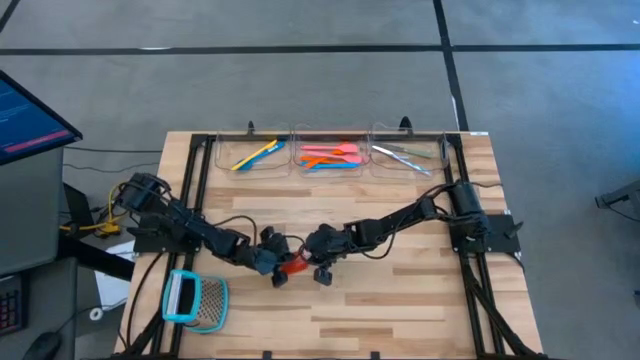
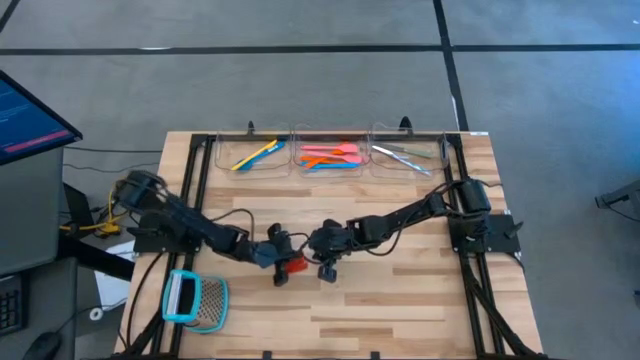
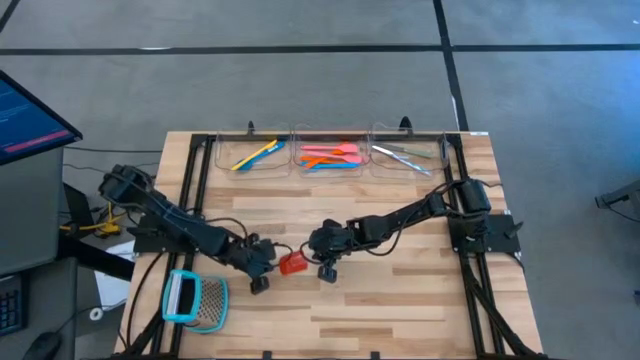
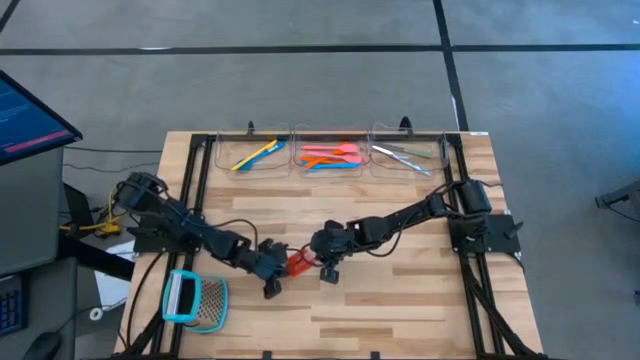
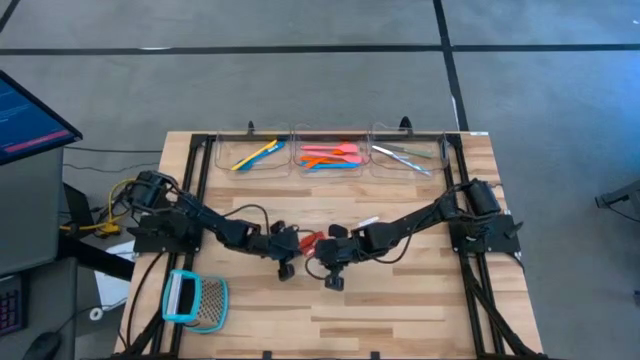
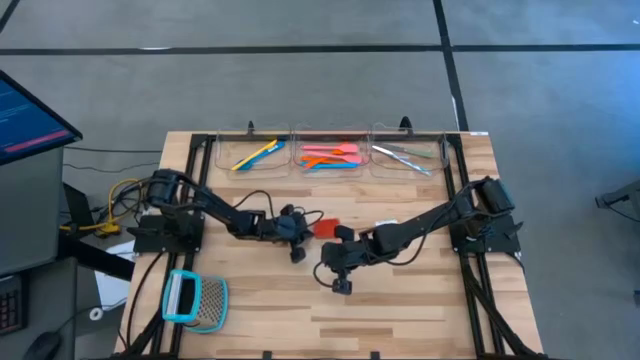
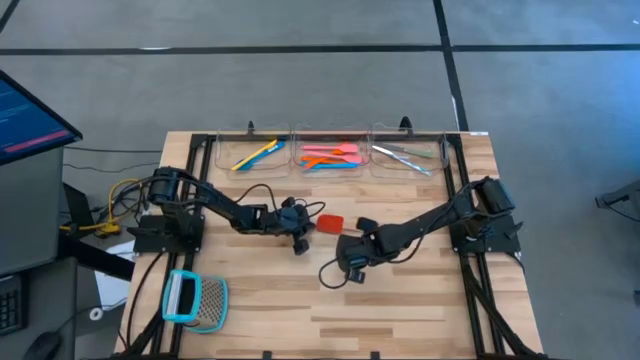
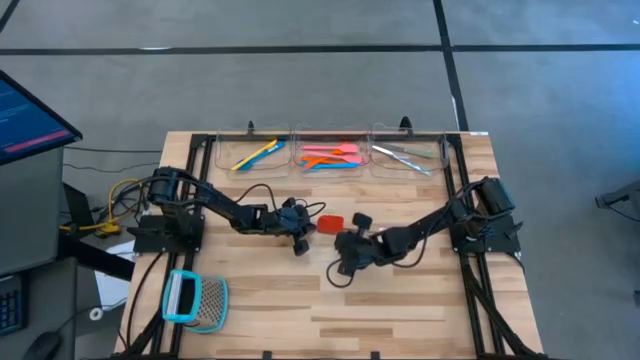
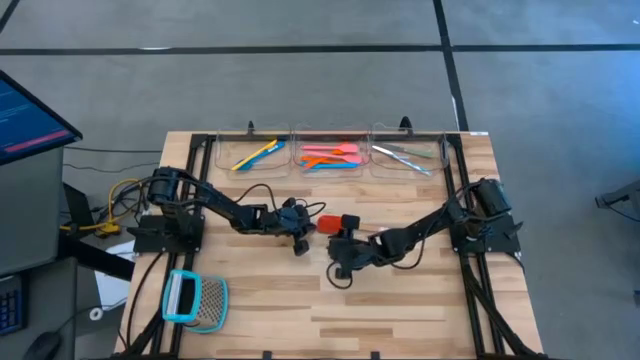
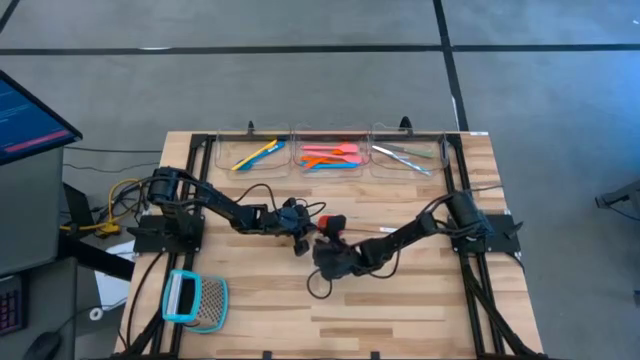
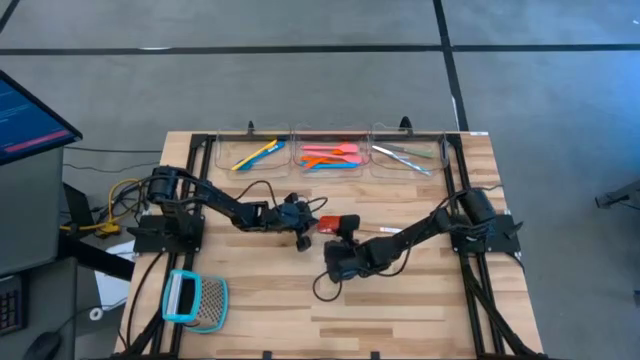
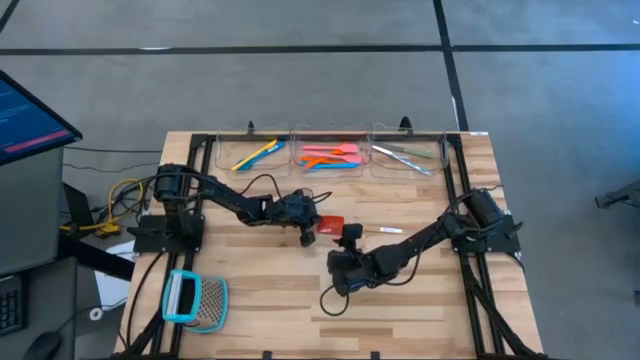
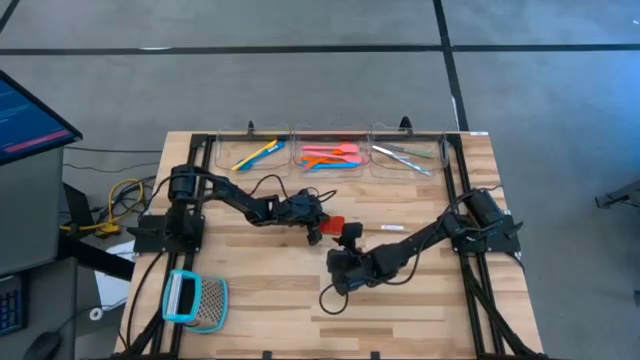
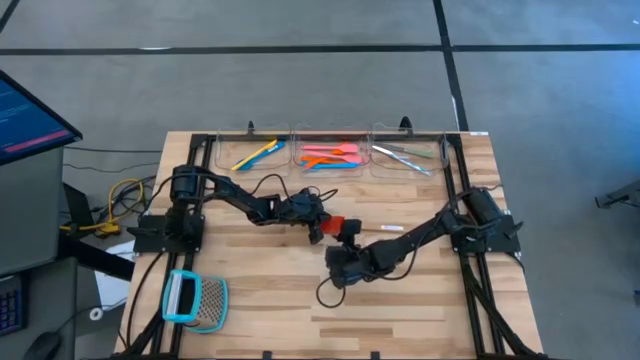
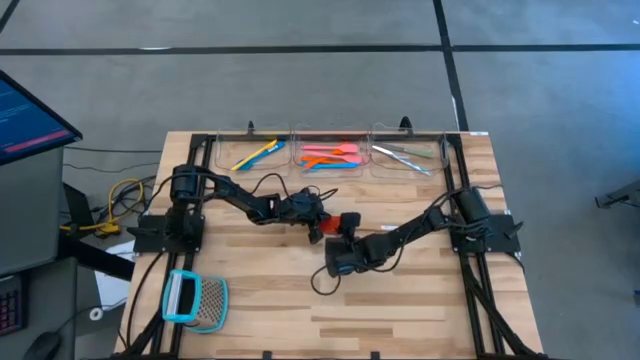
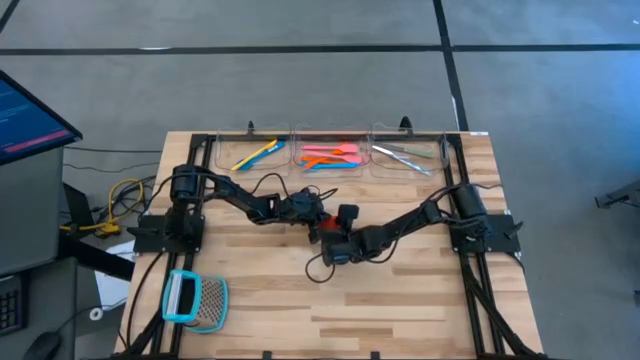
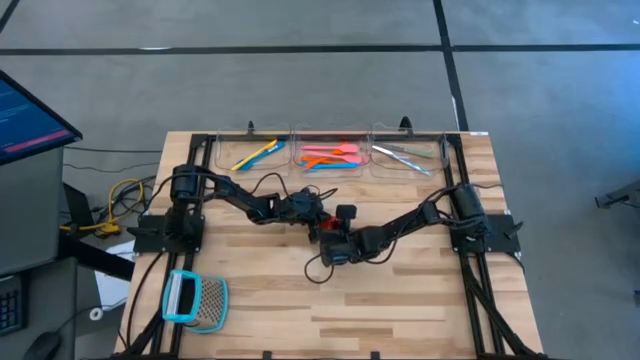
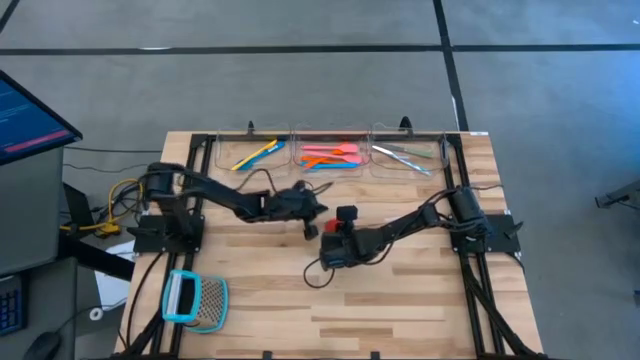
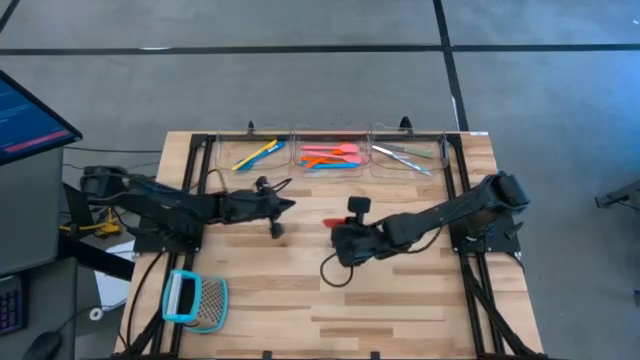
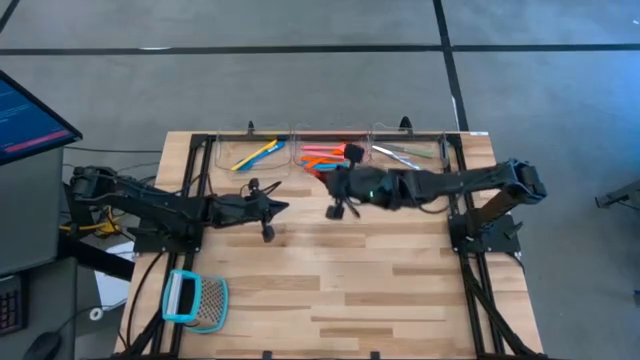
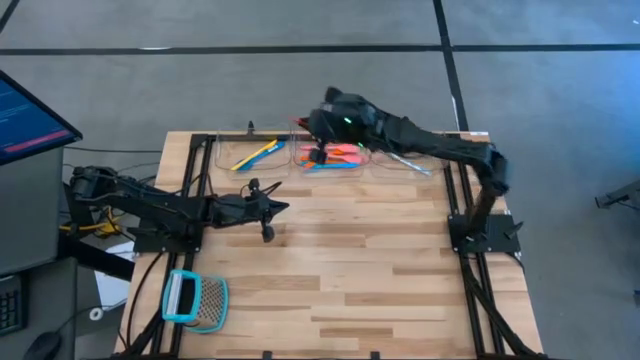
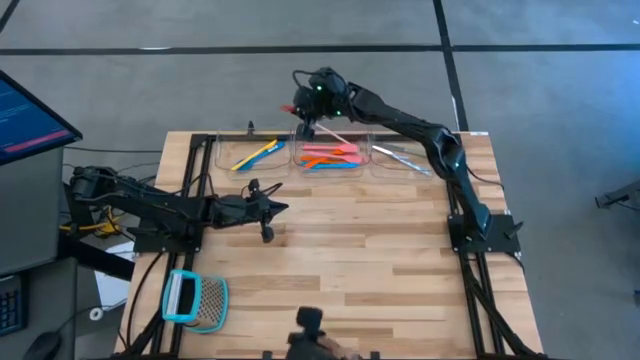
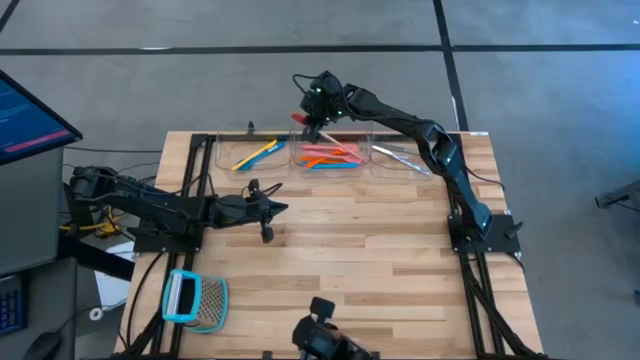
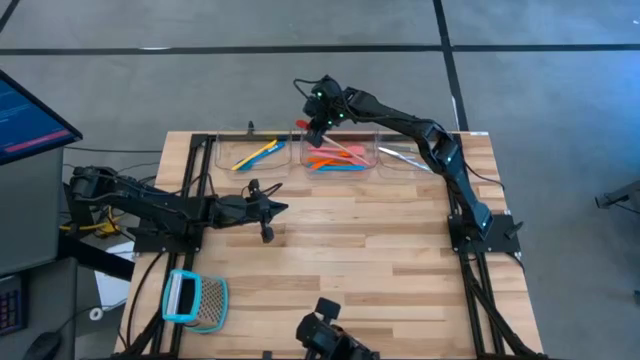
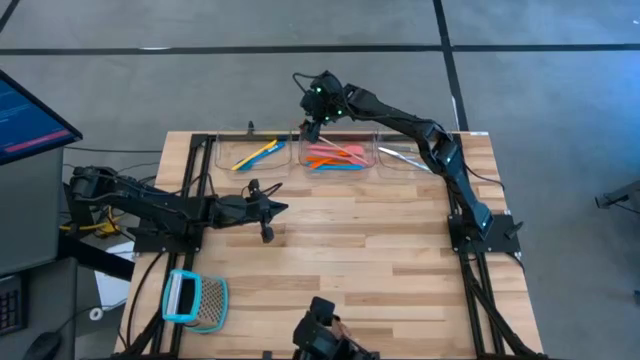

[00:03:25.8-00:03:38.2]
Task: Pick & Place Kitchen Items
Put the red spatula into the middle transparent bin

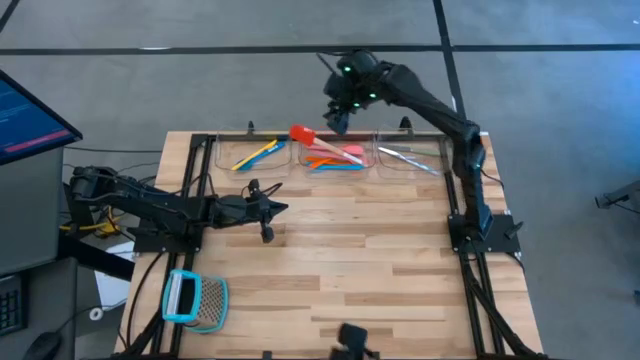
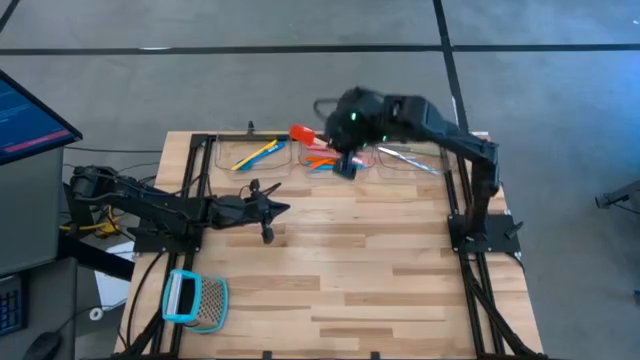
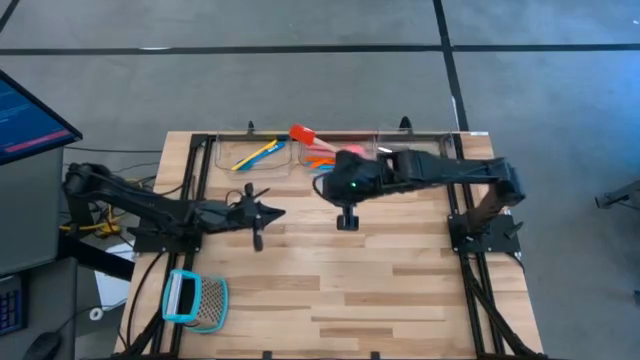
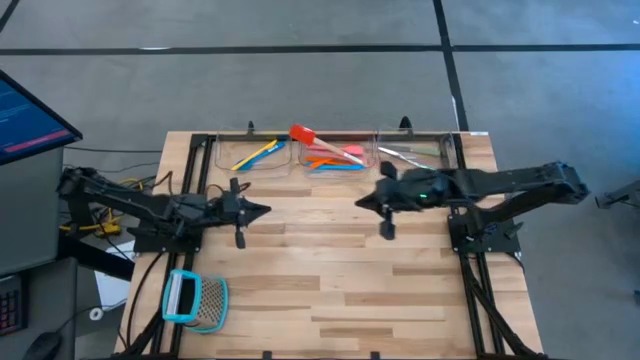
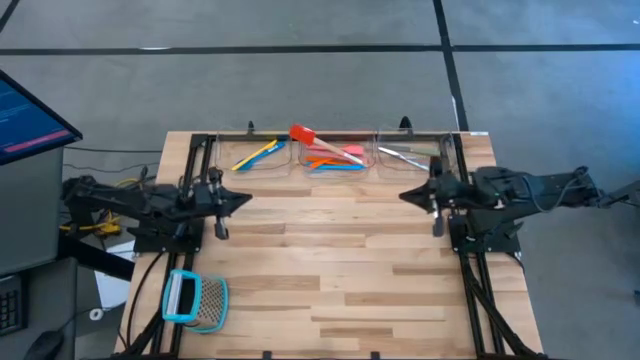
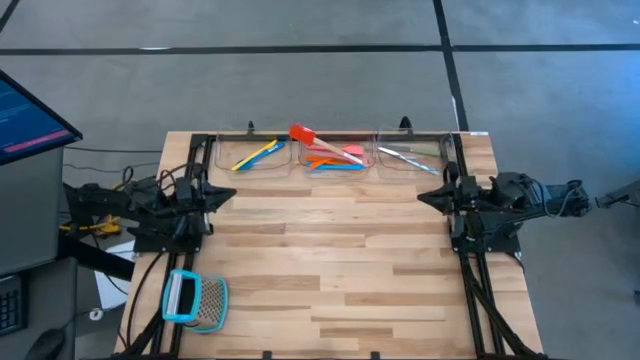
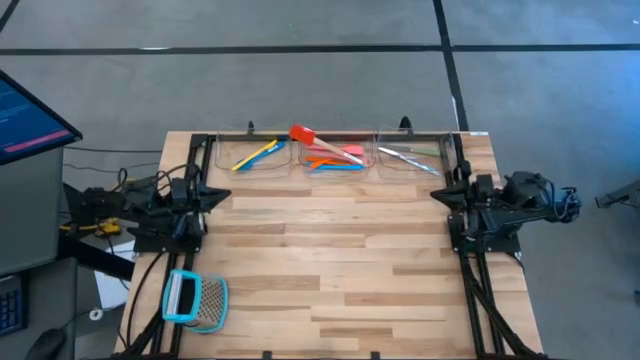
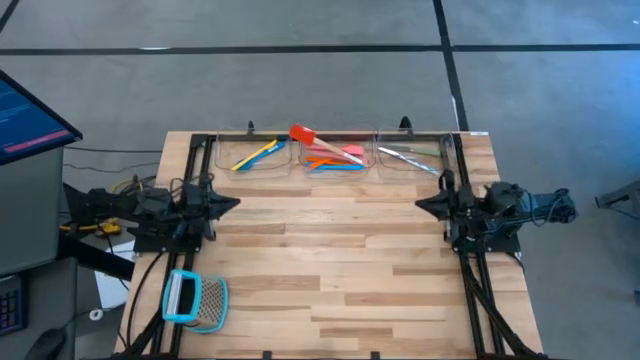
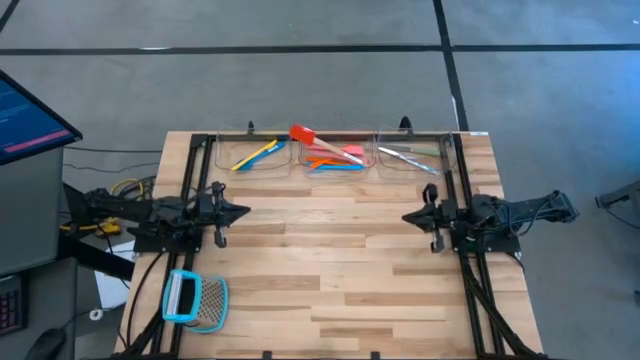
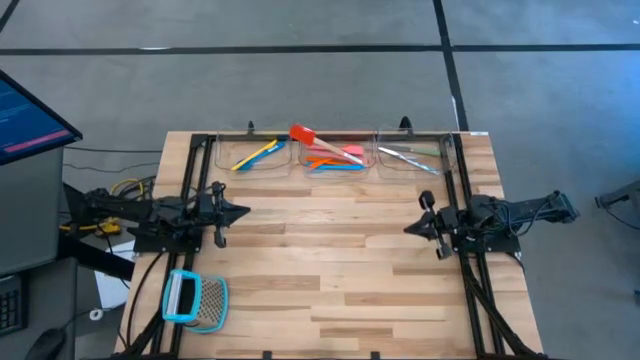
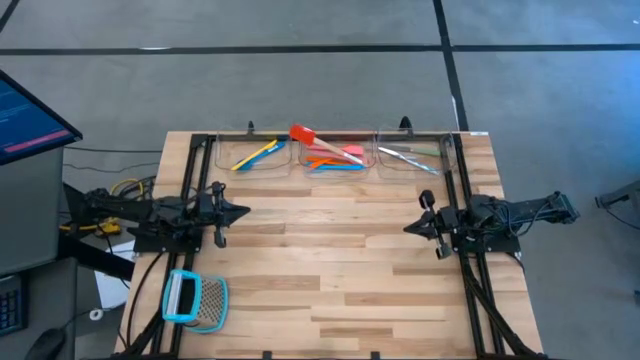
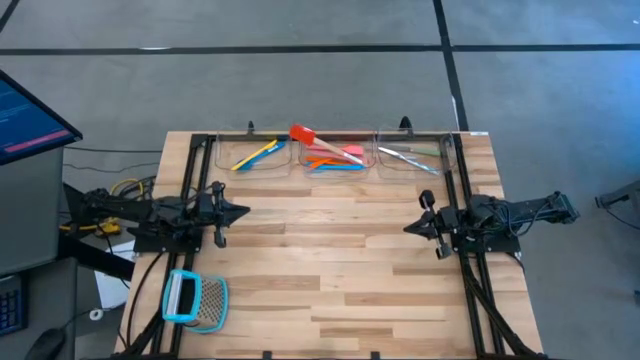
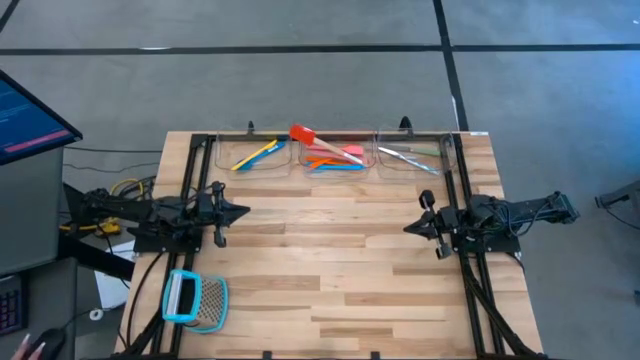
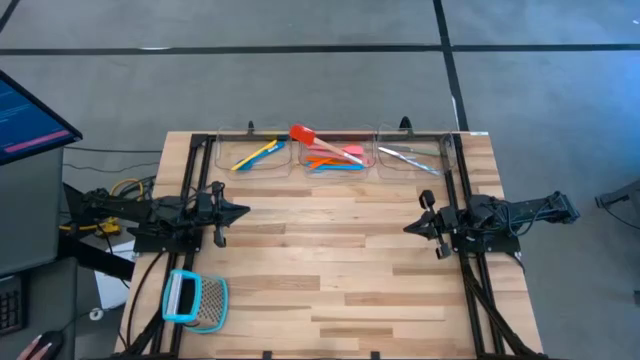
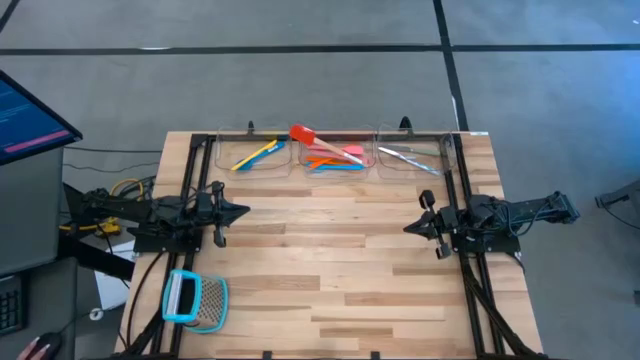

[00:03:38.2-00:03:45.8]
Return to Home Position
